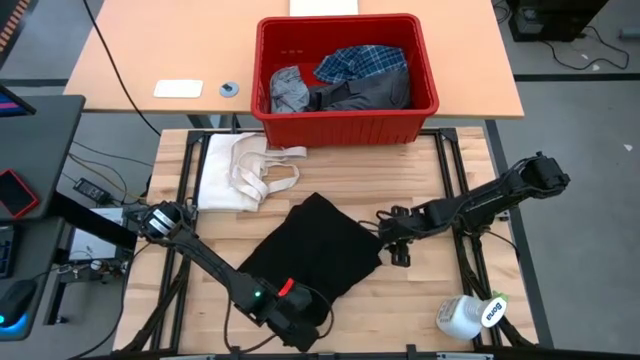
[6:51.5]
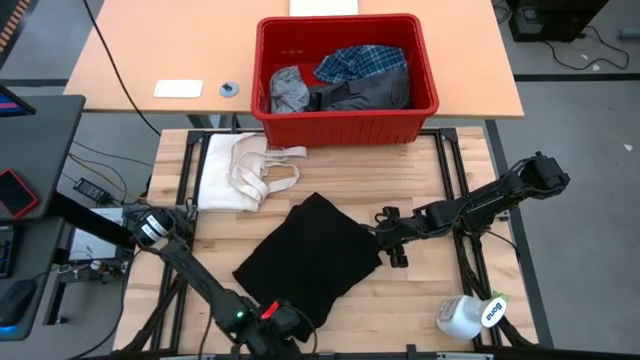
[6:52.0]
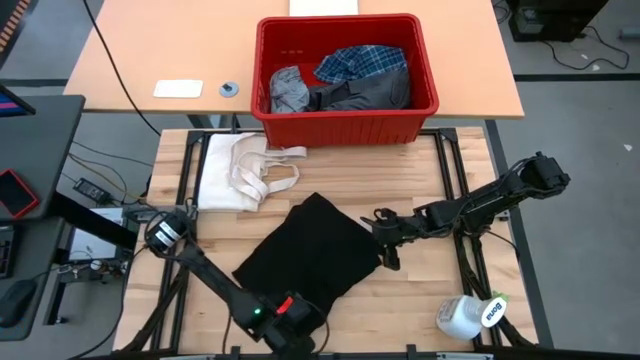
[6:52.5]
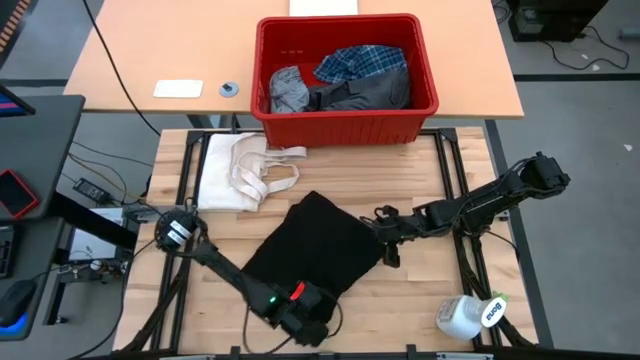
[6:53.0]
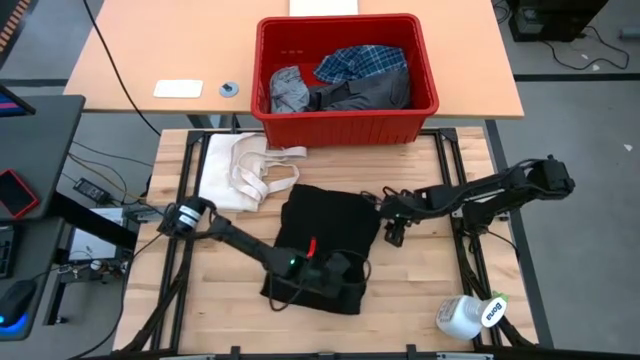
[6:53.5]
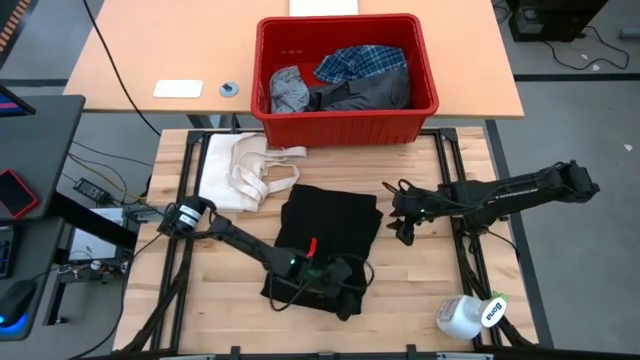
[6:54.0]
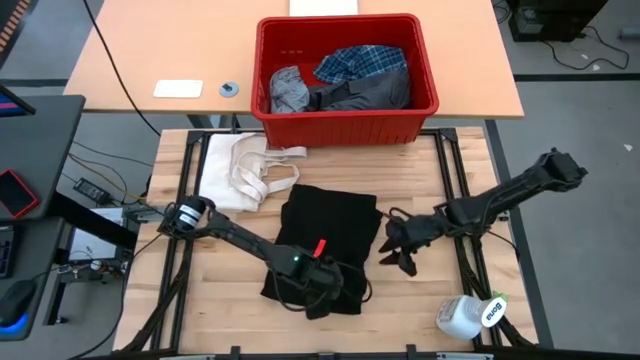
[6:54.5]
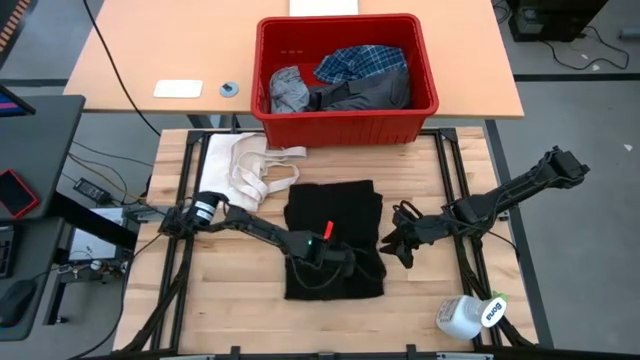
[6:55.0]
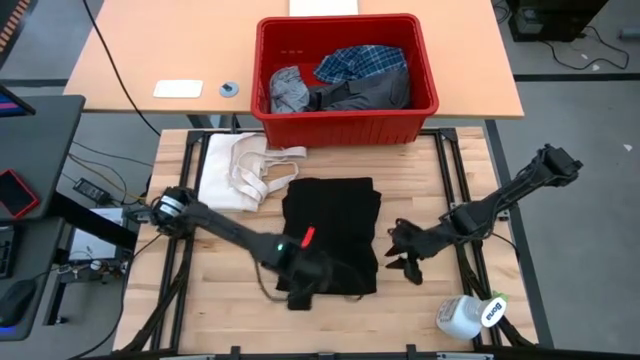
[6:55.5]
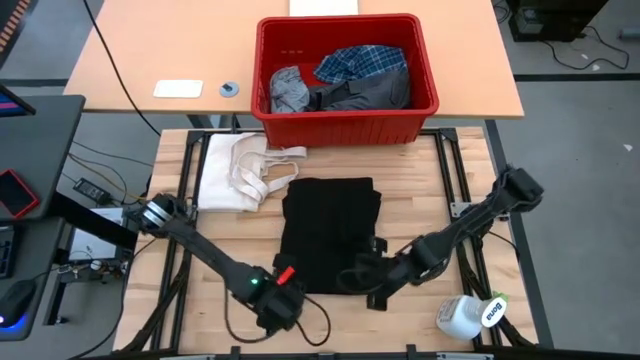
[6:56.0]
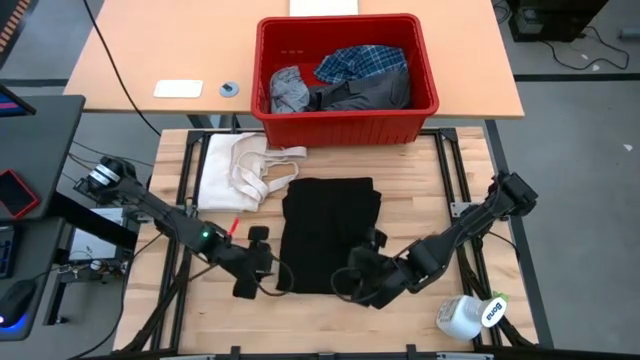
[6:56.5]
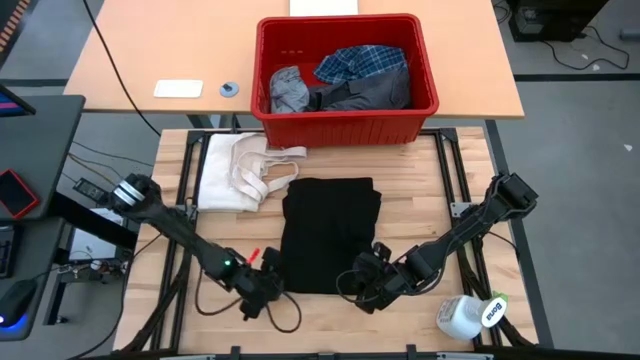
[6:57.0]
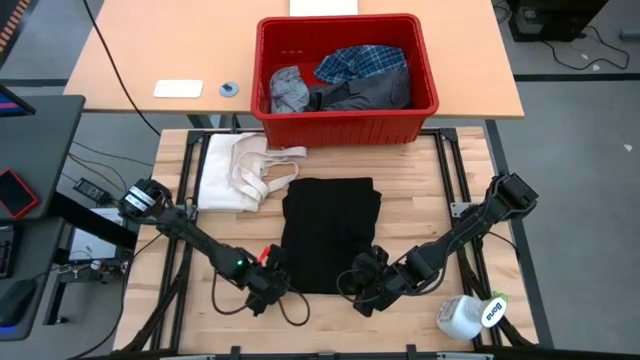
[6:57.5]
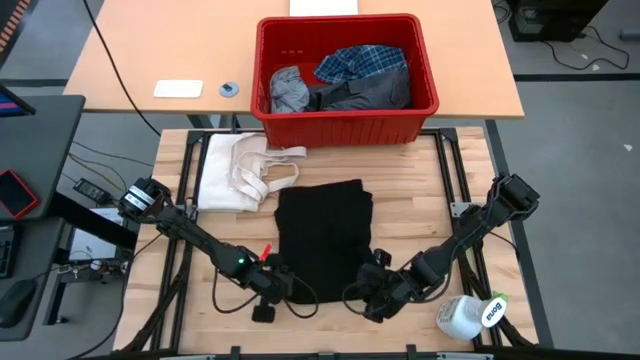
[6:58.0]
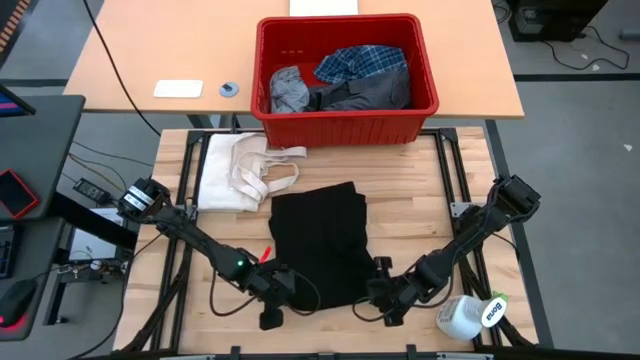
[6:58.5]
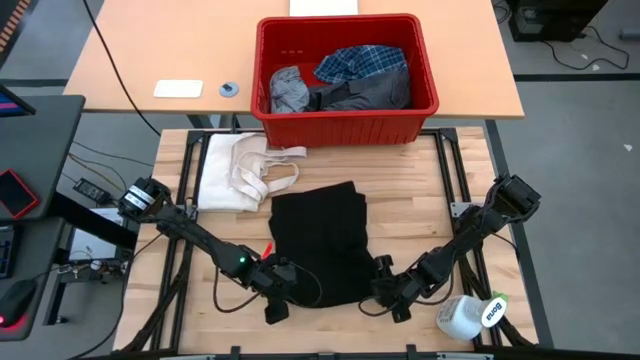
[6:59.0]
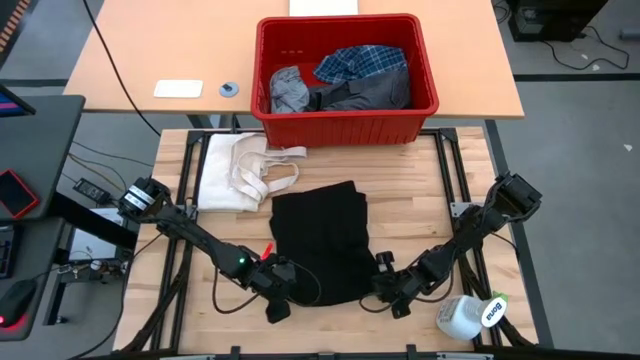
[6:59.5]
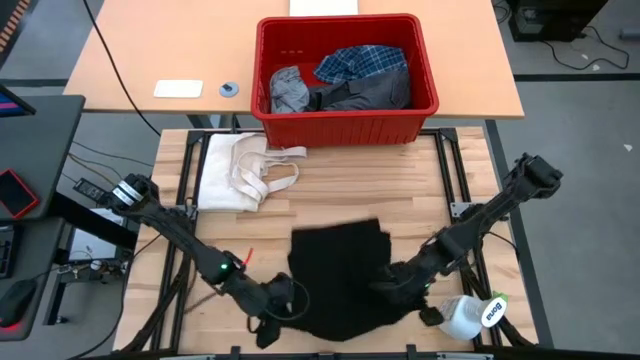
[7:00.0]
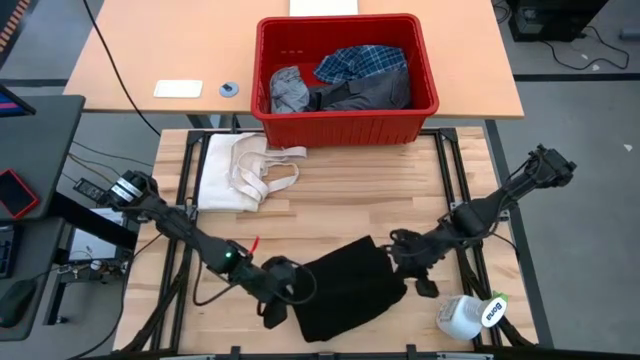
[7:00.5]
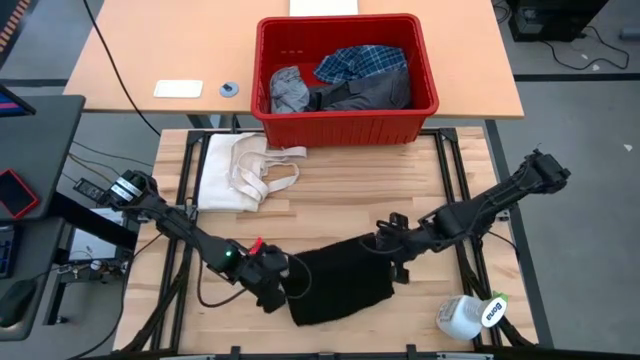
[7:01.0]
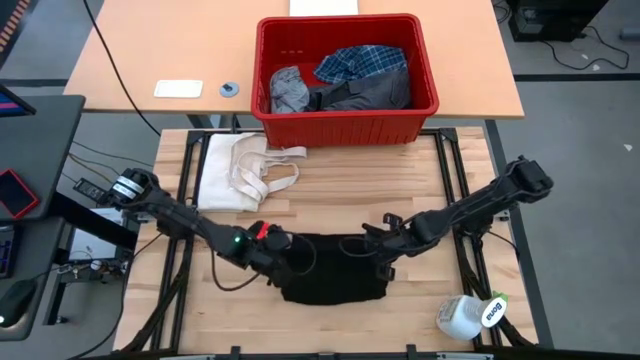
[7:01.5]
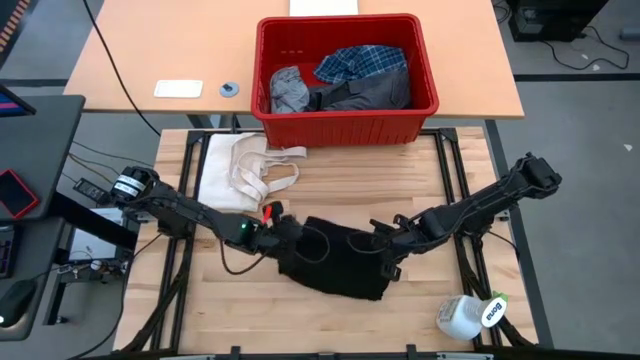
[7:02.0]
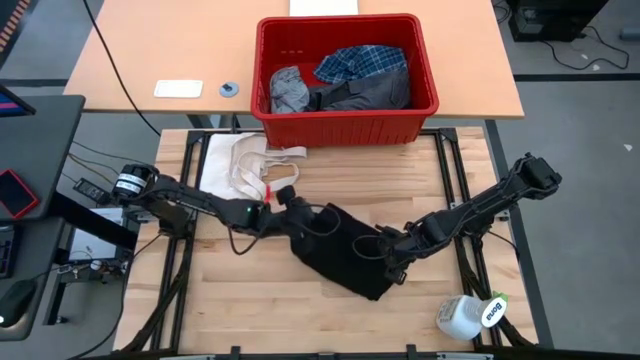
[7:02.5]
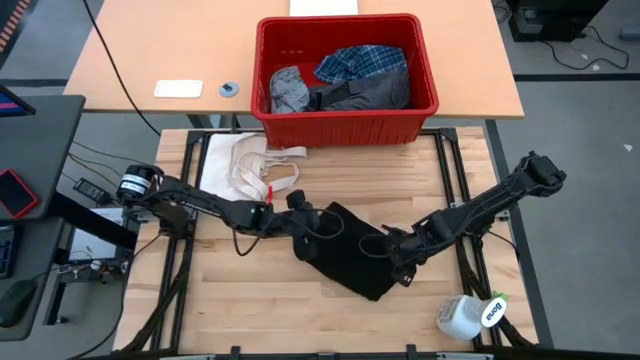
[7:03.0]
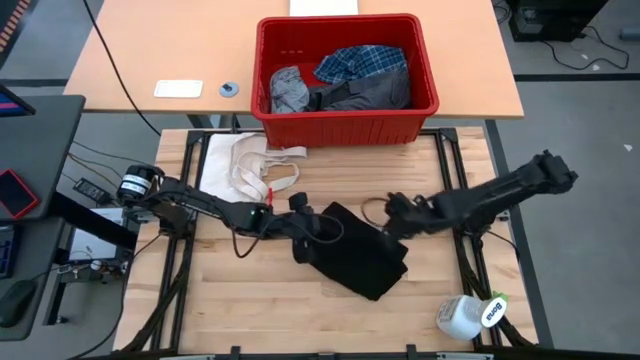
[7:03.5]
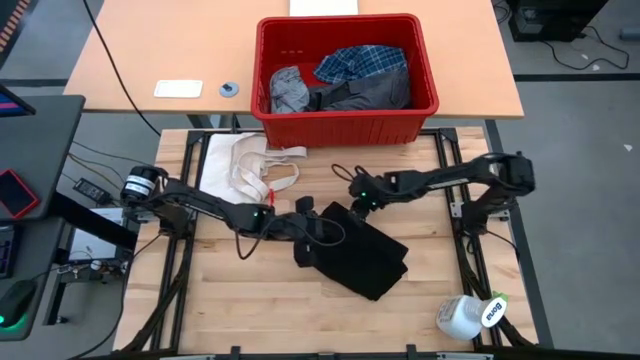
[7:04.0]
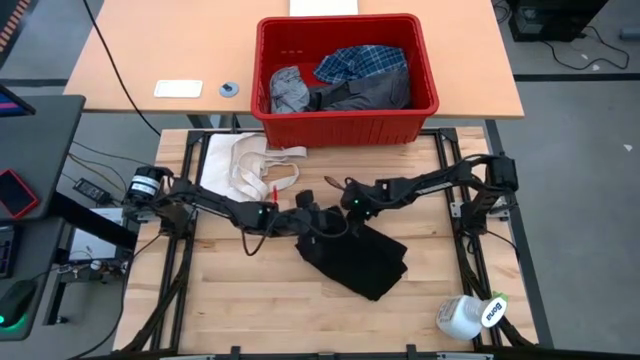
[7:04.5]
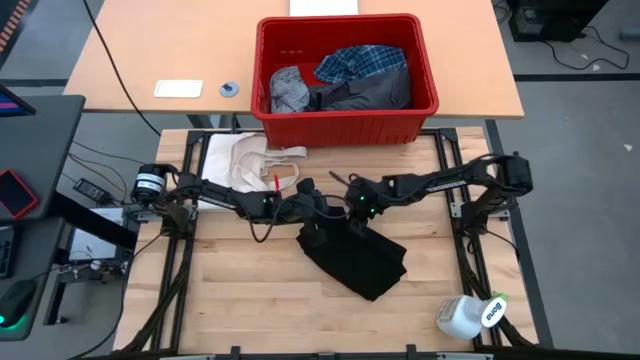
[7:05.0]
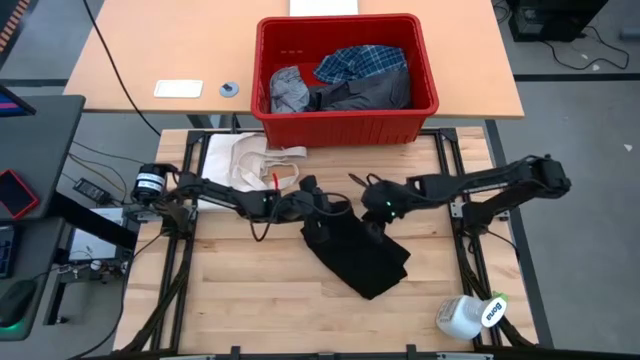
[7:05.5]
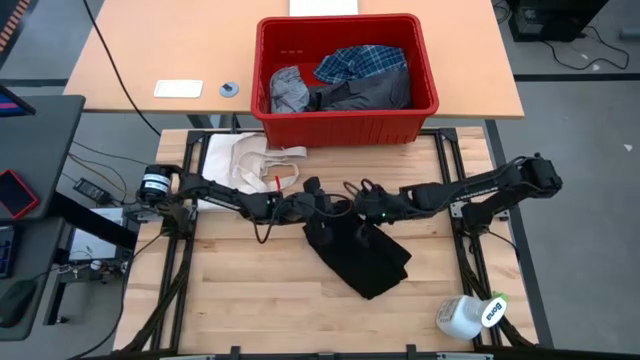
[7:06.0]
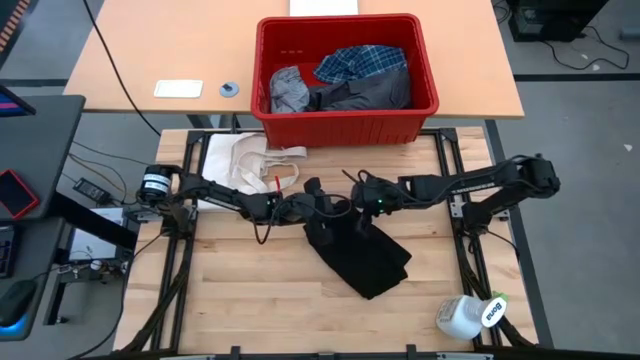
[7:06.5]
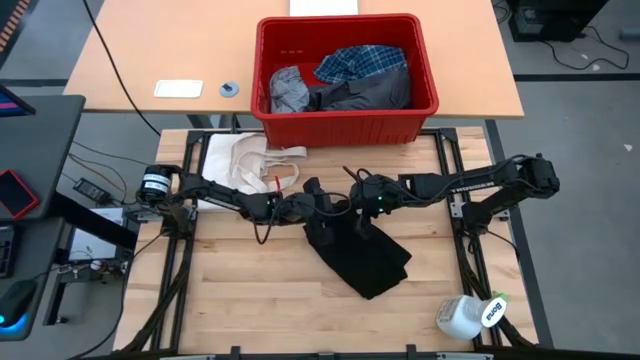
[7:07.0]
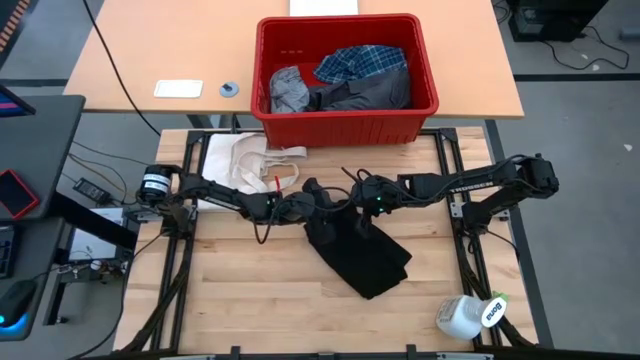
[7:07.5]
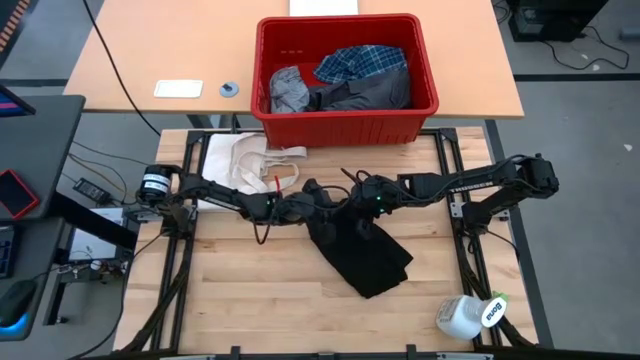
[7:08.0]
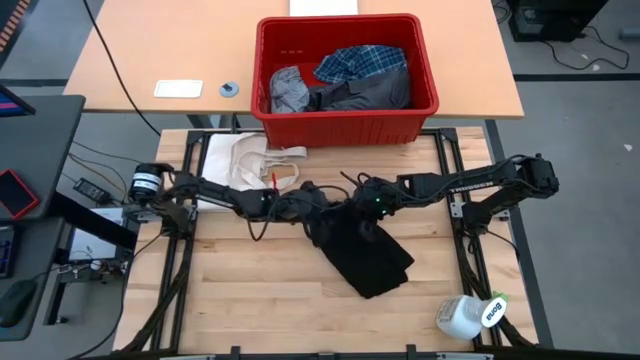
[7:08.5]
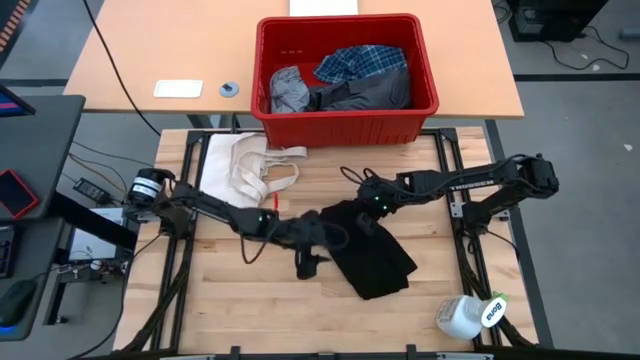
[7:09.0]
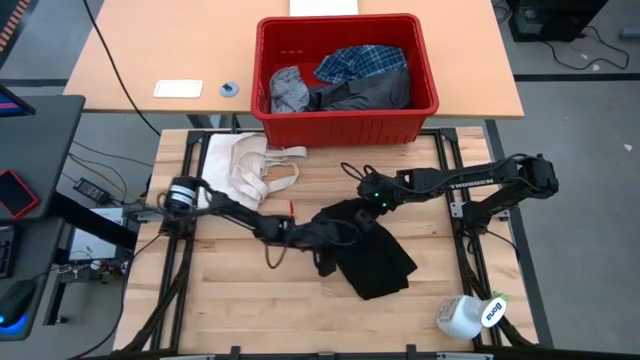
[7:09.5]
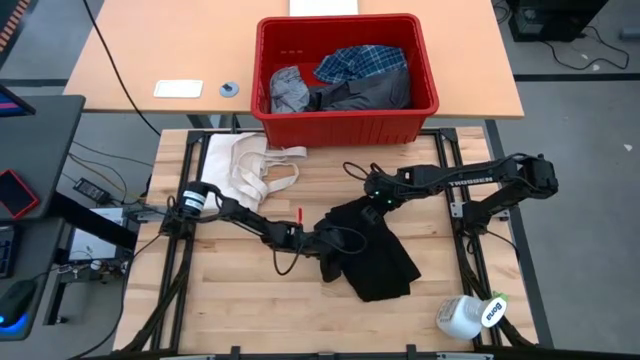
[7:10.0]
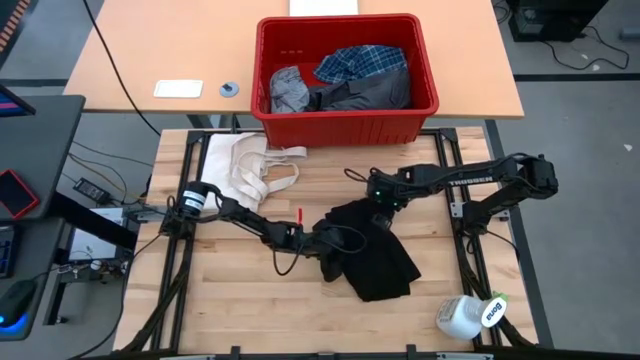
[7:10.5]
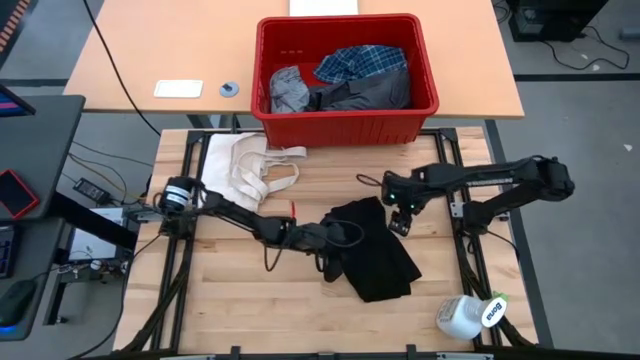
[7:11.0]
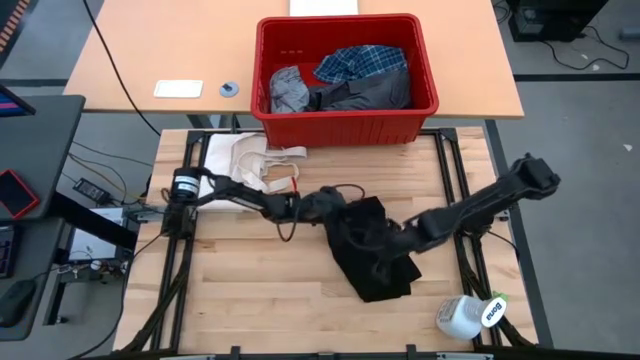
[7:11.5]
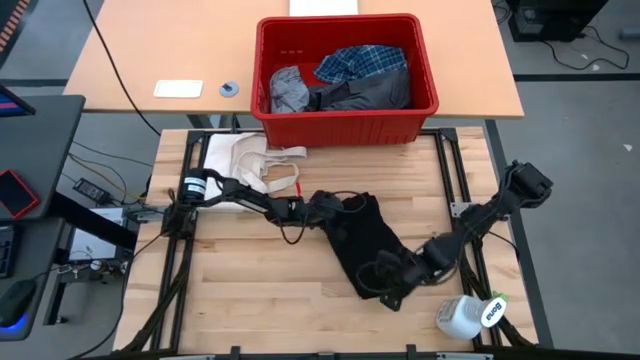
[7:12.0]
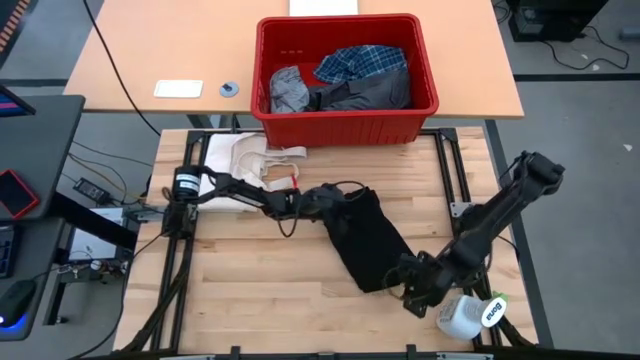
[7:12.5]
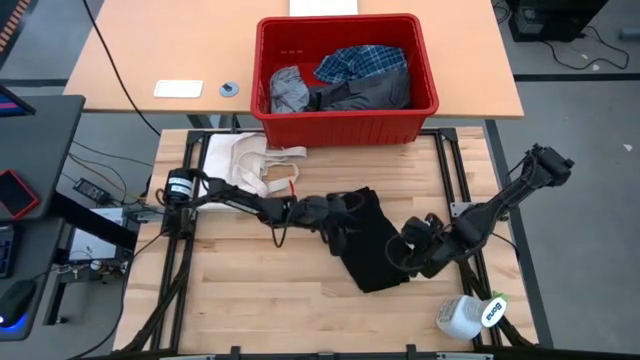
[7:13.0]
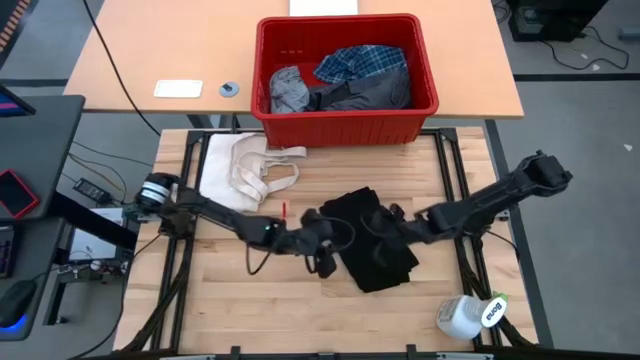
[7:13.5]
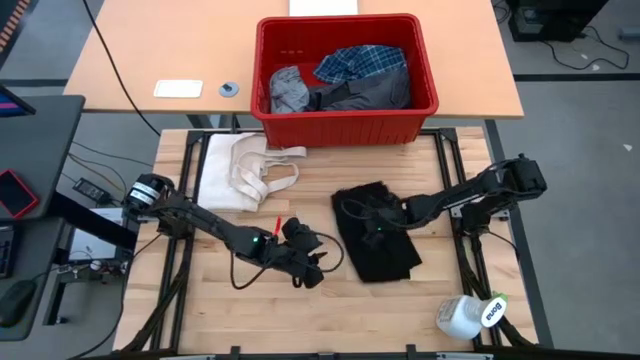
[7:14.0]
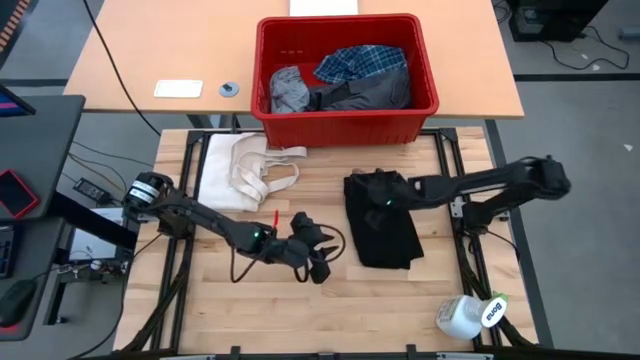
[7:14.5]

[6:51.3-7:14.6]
Task: Fold Laundry from Bin
Fold the black shirt
